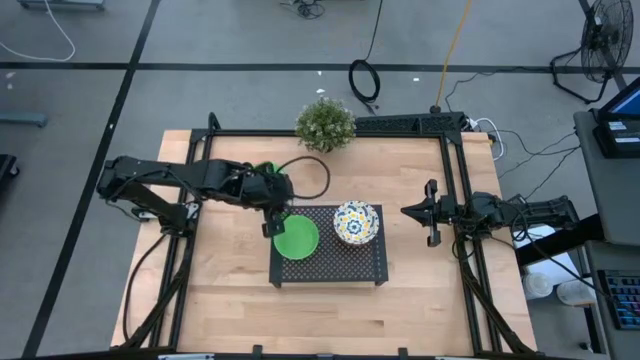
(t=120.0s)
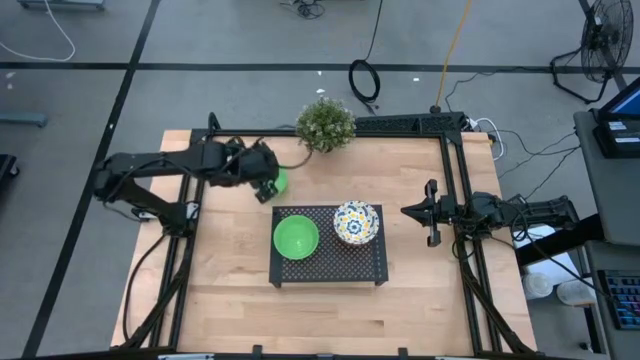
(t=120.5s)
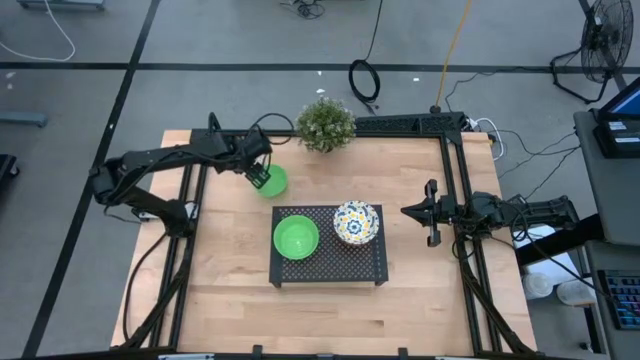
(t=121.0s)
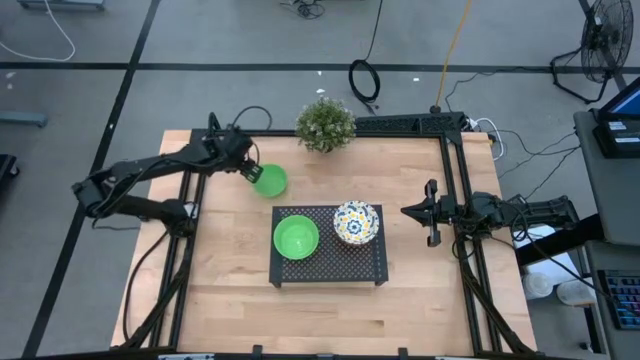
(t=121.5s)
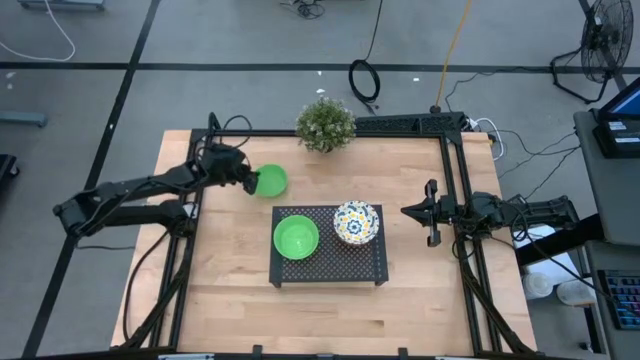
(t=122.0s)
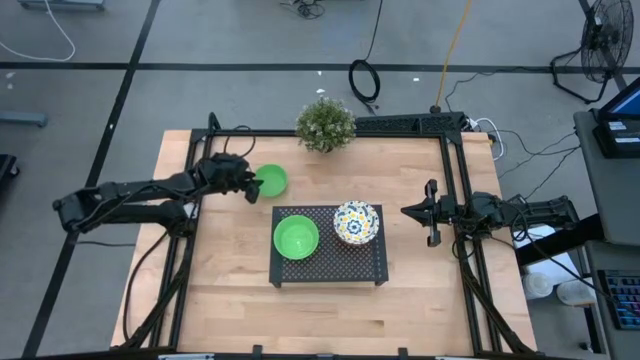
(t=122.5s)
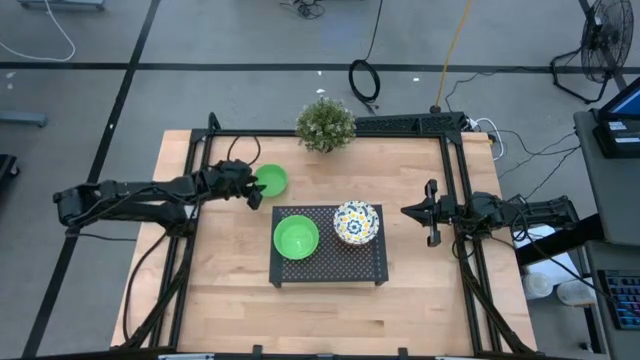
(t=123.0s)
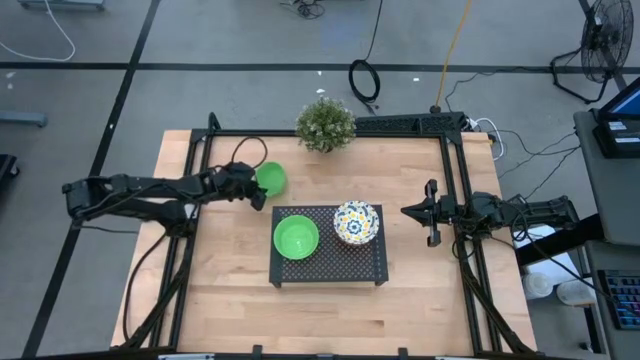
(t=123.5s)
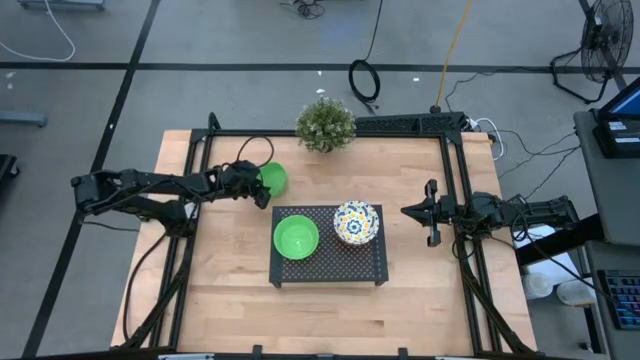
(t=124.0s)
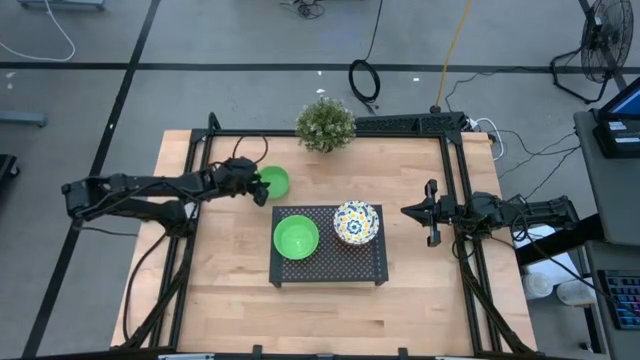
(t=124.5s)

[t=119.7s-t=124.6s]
Task: Pick & Place Mini bowls
Stack the green bowl on top of the green bowls on the shelf

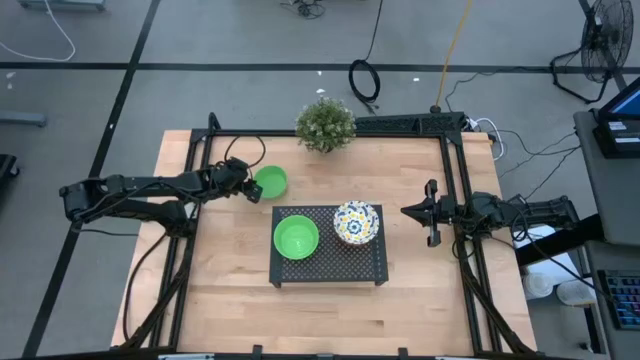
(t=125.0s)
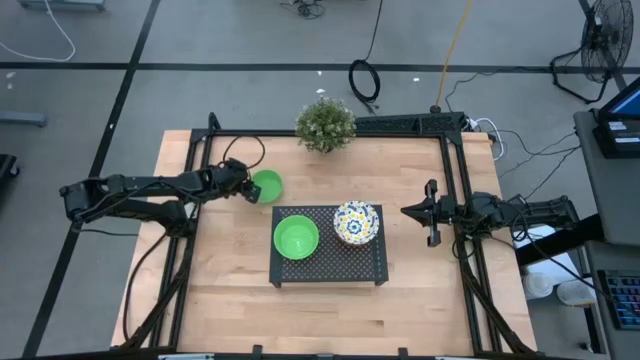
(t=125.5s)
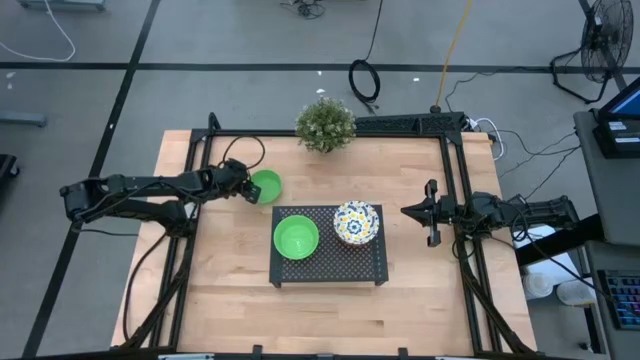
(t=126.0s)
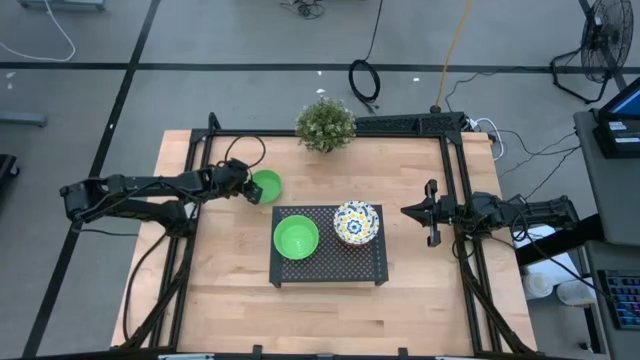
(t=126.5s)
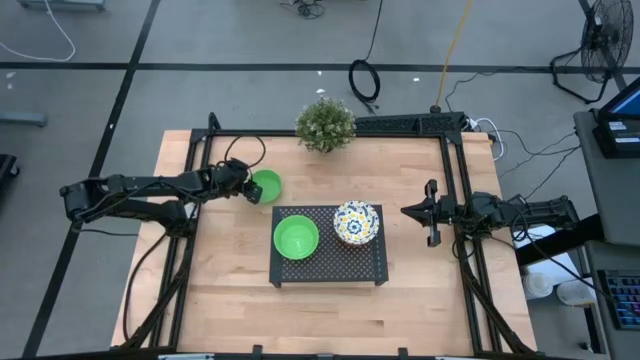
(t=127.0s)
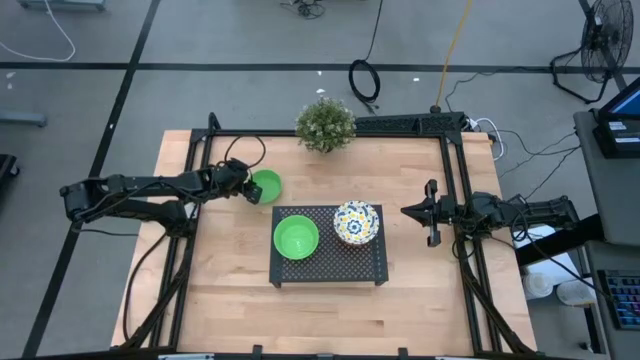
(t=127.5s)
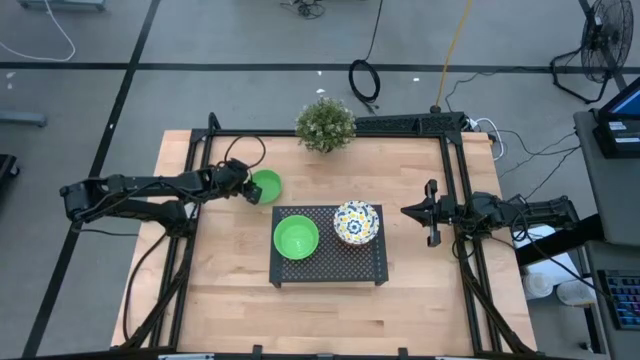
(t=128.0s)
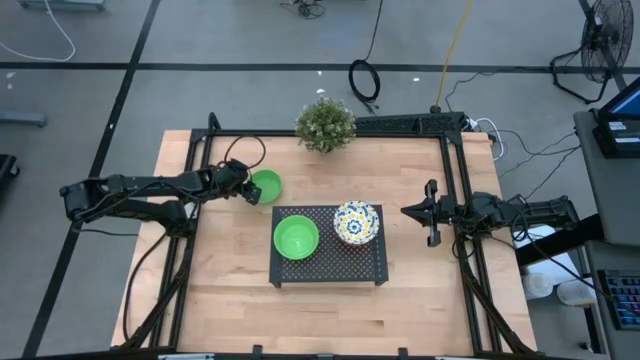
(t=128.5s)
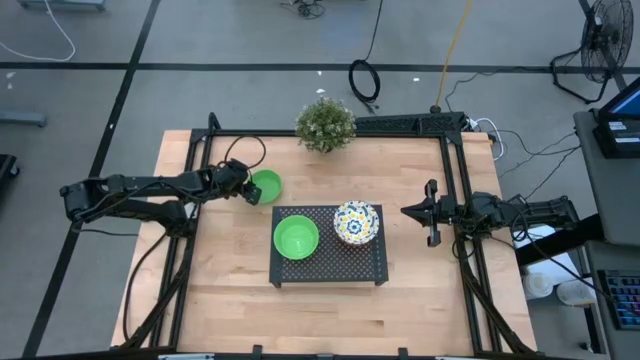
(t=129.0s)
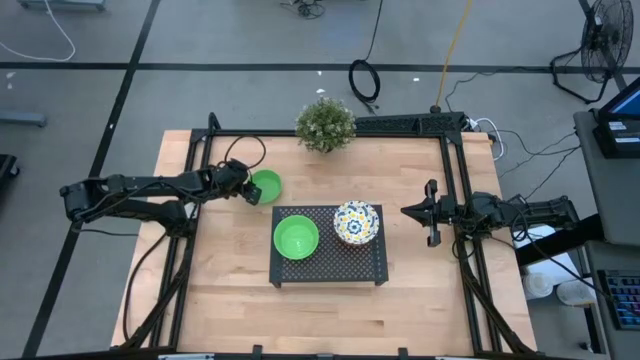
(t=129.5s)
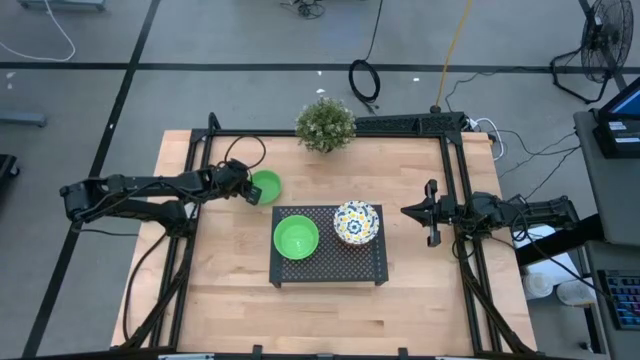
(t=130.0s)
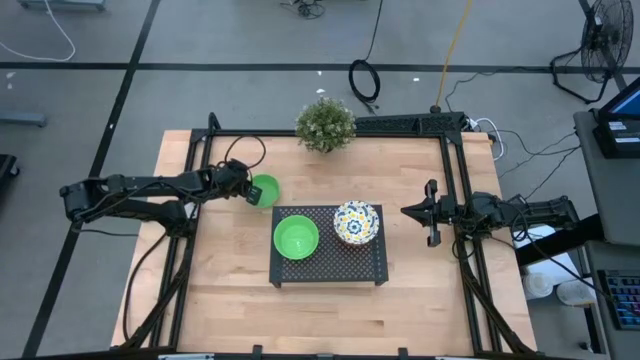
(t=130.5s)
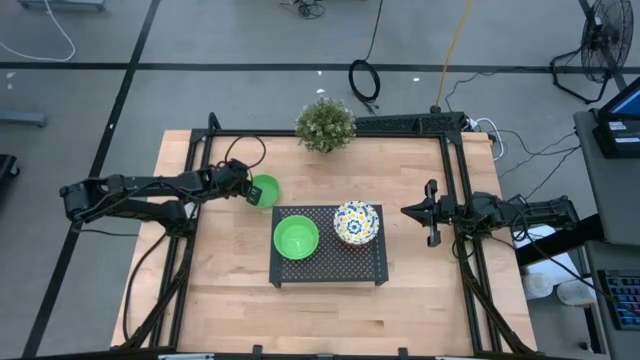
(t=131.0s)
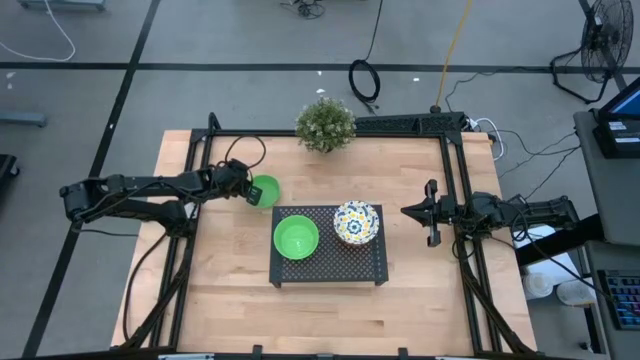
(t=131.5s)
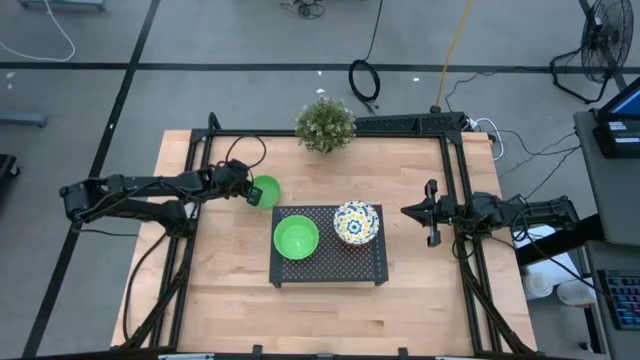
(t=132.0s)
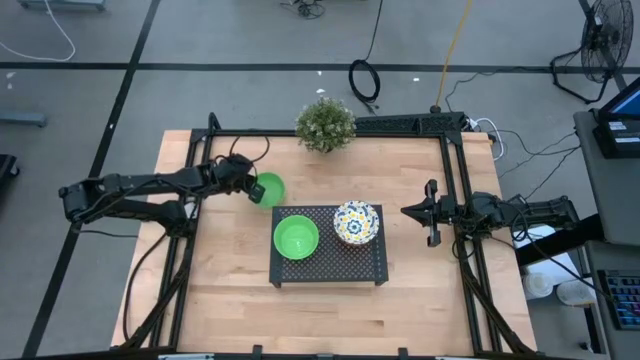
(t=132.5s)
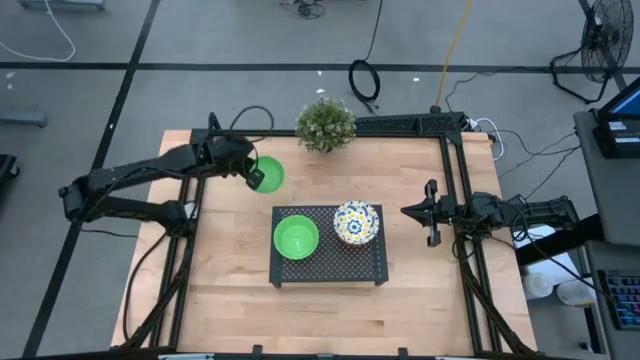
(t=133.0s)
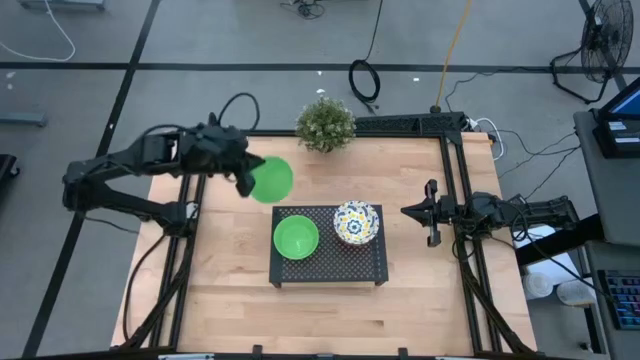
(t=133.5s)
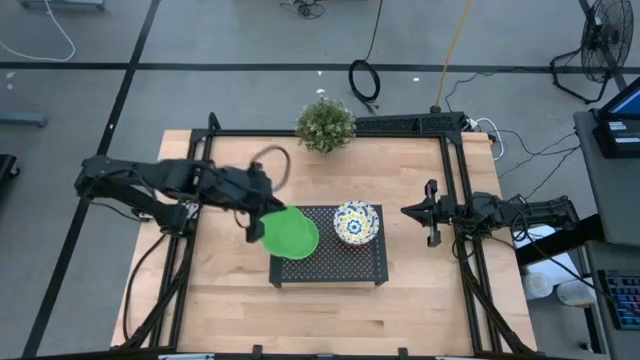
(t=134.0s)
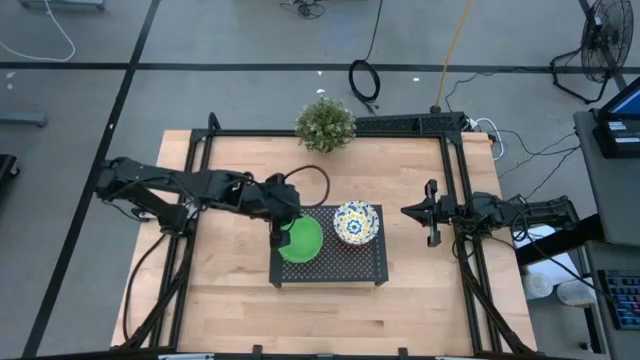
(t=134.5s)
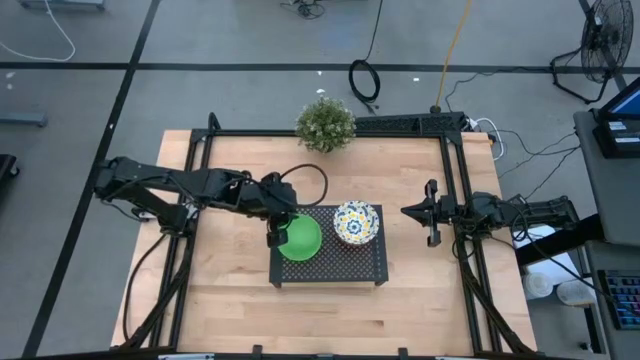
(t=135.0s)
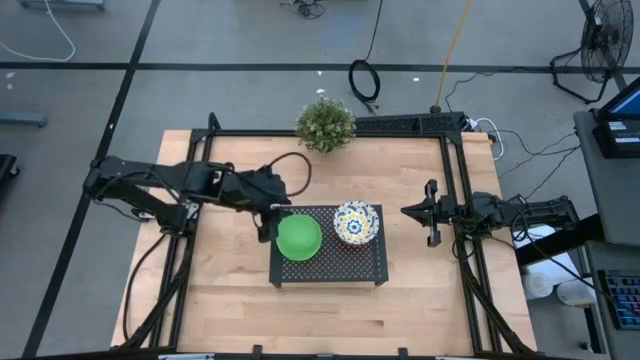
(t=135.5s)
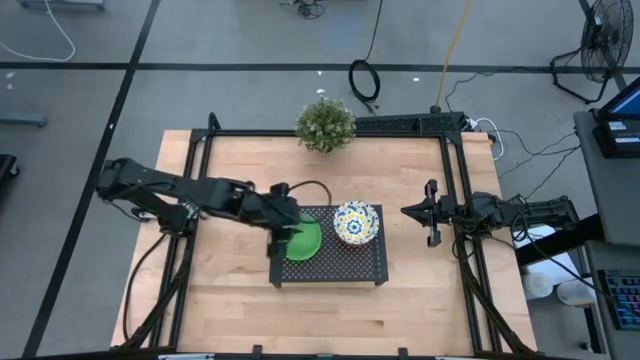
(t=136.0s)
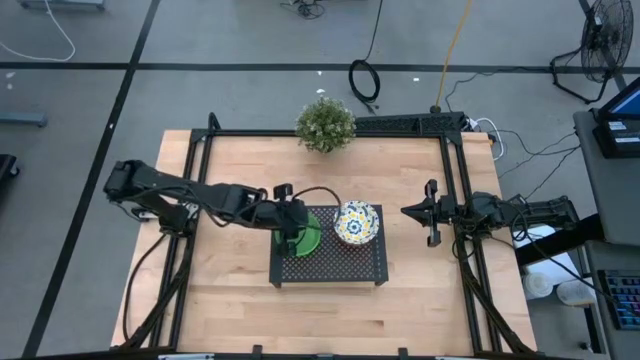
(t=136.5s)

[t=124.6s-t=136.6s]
Stack the green bowl on top of the green bowls on the shelf

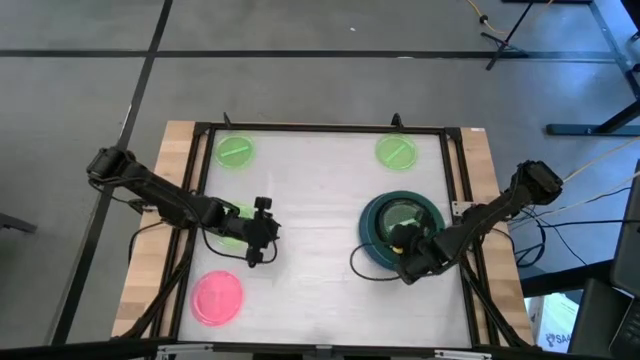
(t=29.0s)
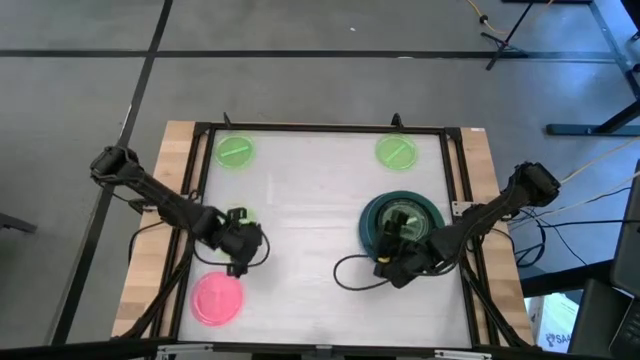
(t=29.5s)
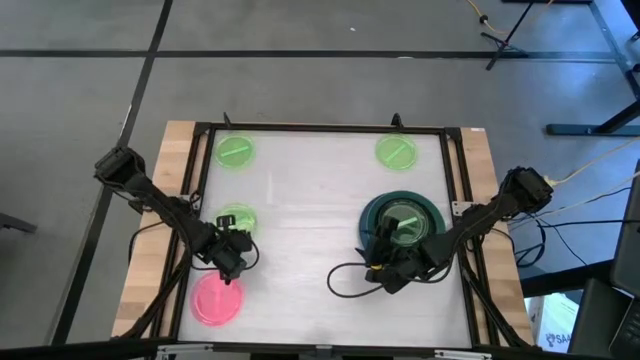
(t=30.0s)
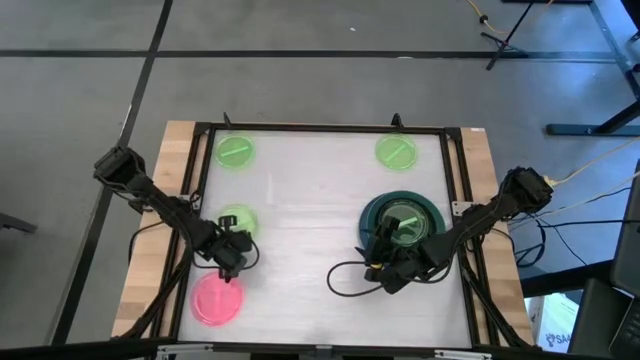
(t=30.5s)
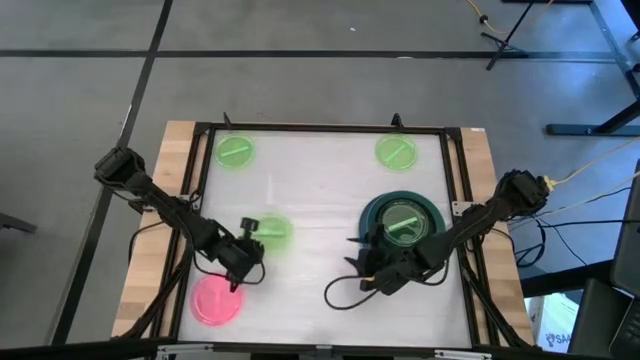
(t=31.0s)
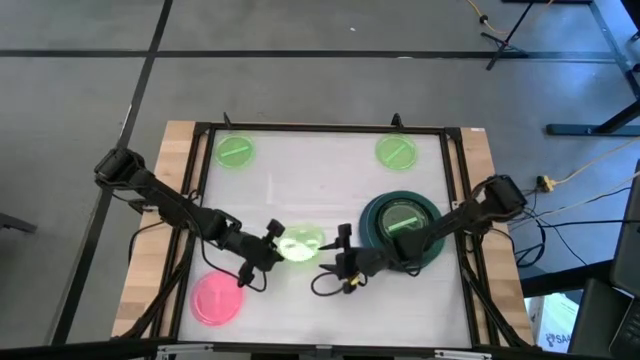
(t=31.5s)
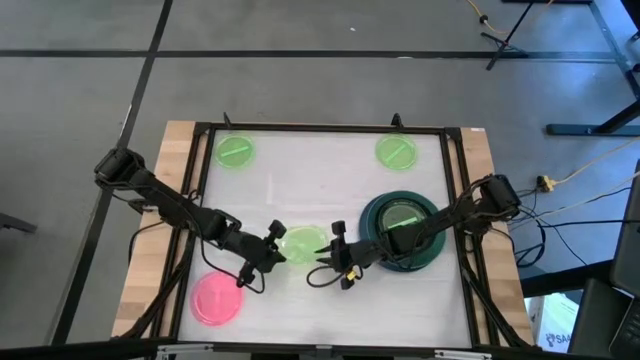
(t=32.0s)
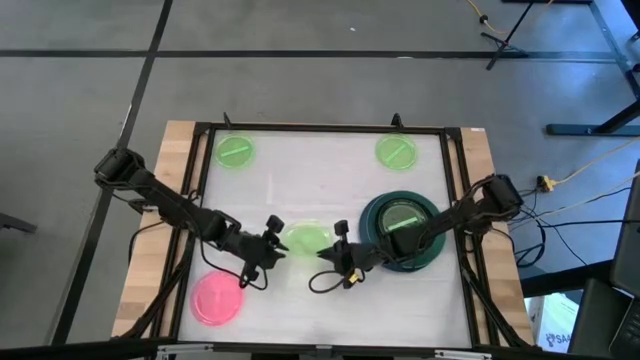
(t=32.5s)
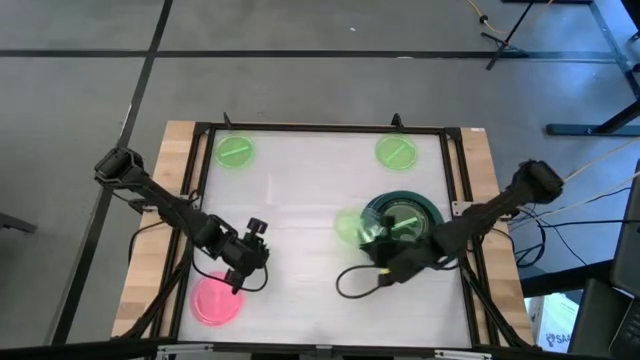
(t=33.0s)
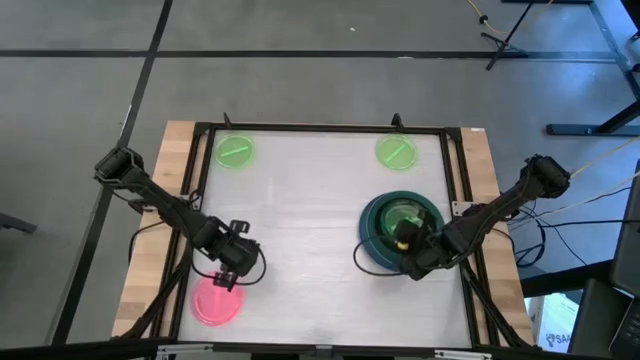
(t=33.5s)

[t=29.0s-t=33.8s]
Task: Stack plastic plates
Stack the middle left transparent green plate into the transparent green plate
